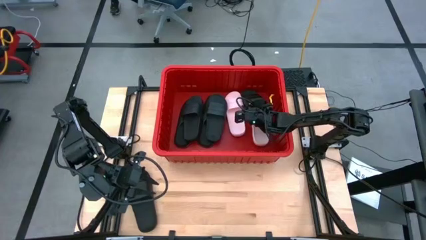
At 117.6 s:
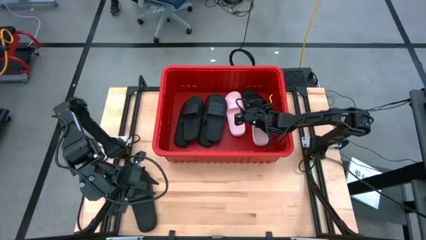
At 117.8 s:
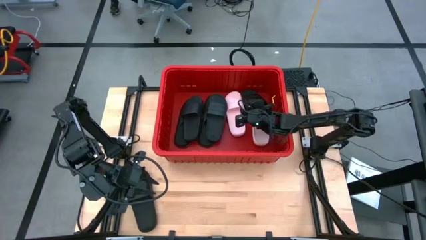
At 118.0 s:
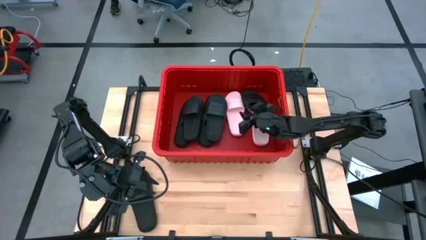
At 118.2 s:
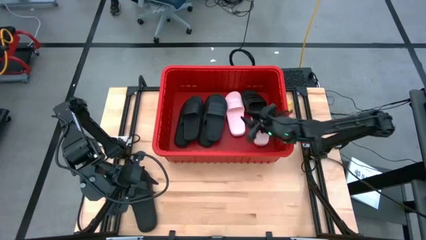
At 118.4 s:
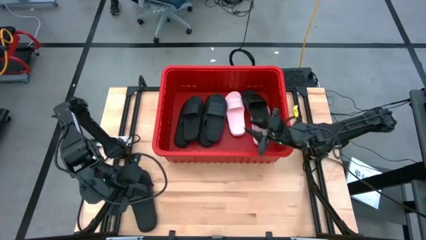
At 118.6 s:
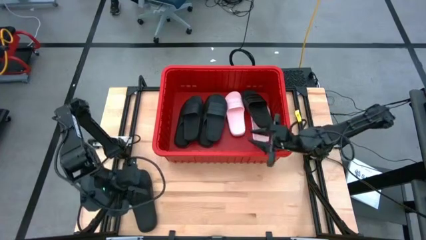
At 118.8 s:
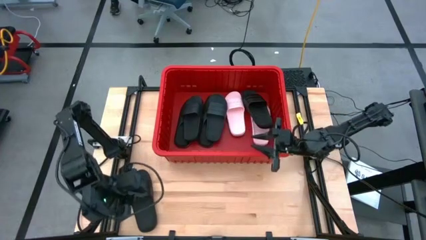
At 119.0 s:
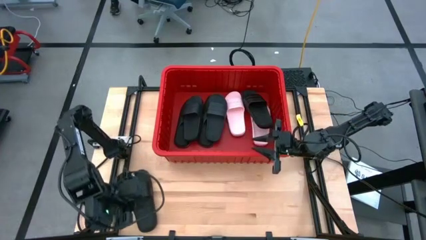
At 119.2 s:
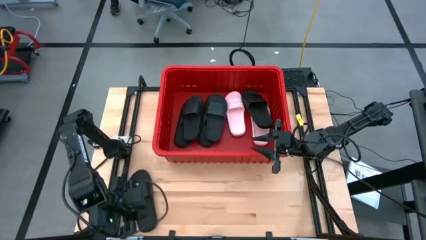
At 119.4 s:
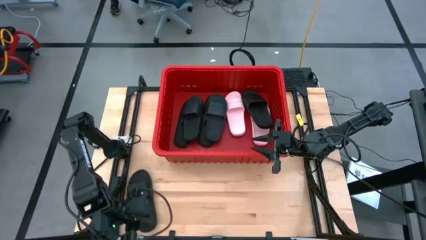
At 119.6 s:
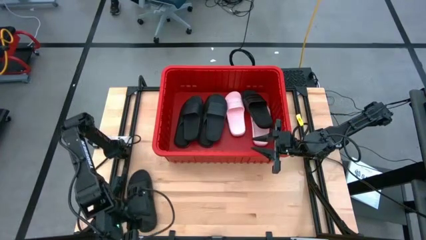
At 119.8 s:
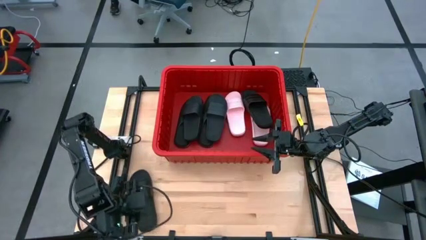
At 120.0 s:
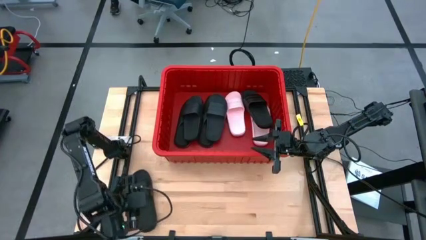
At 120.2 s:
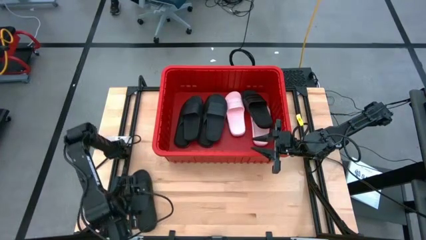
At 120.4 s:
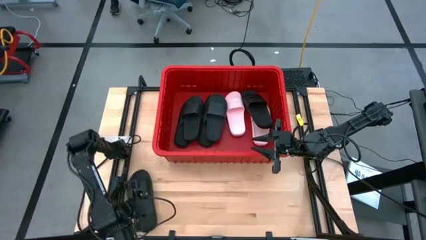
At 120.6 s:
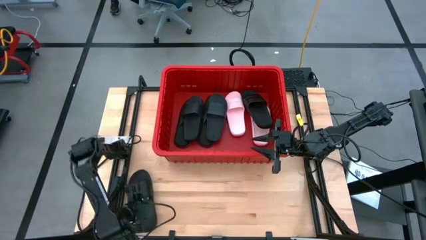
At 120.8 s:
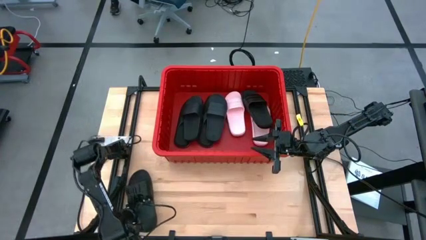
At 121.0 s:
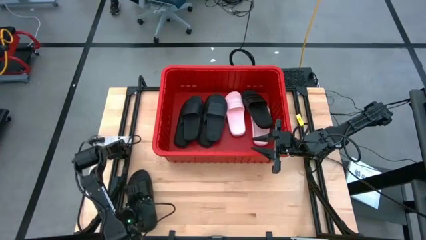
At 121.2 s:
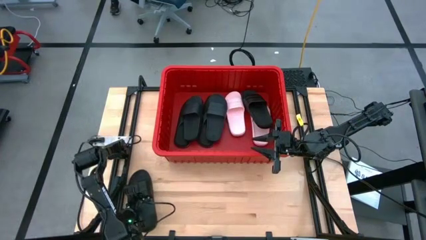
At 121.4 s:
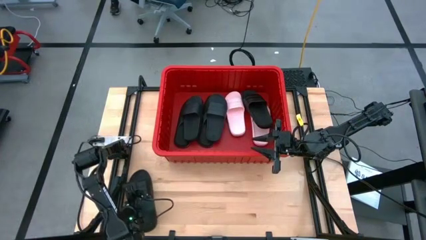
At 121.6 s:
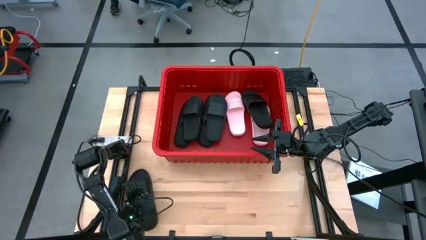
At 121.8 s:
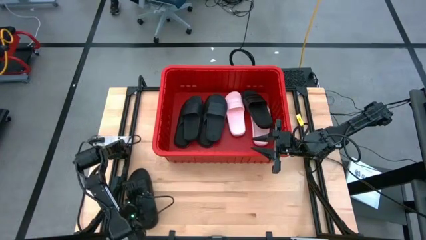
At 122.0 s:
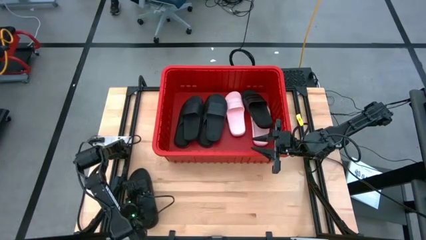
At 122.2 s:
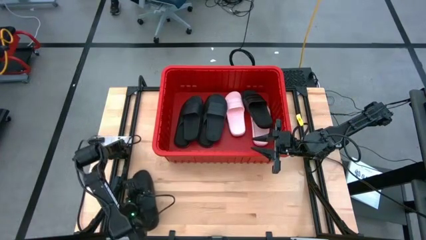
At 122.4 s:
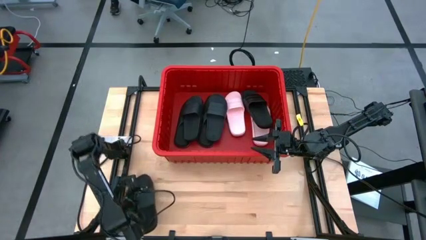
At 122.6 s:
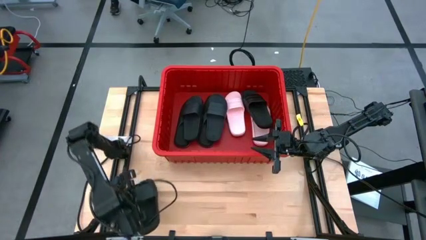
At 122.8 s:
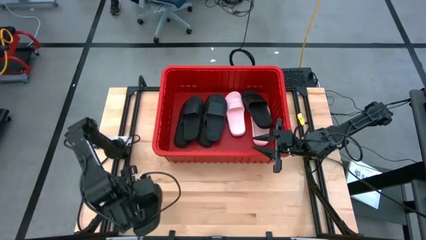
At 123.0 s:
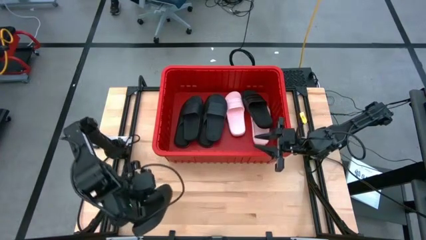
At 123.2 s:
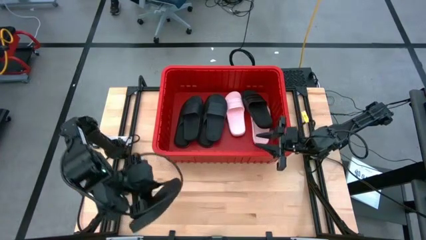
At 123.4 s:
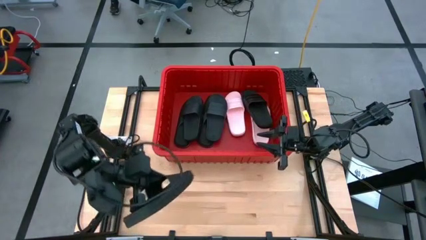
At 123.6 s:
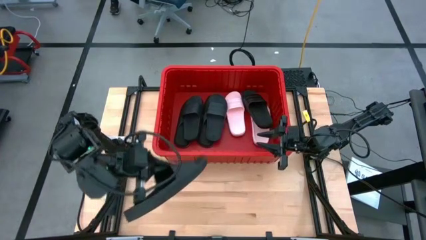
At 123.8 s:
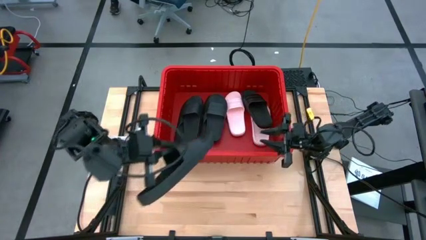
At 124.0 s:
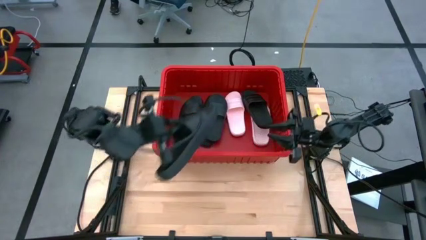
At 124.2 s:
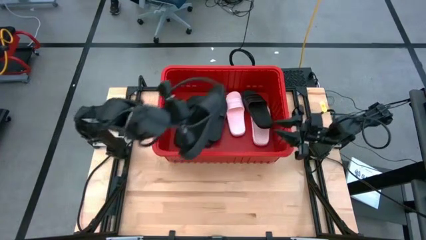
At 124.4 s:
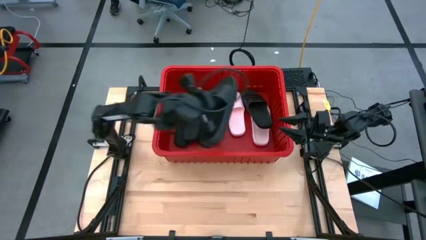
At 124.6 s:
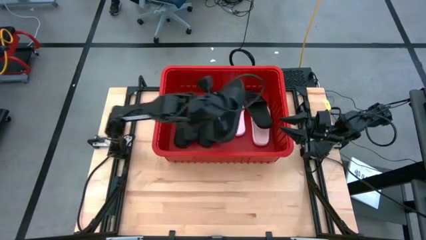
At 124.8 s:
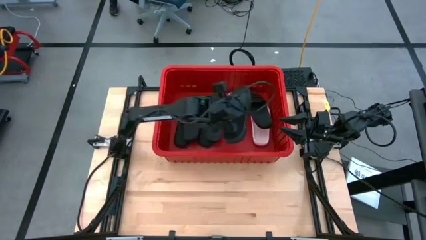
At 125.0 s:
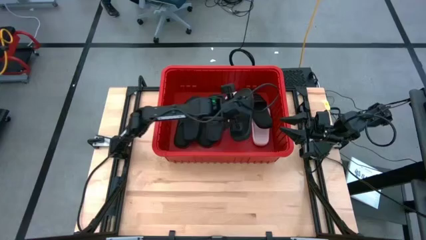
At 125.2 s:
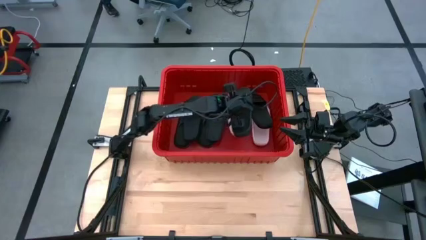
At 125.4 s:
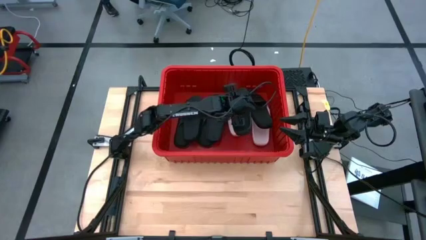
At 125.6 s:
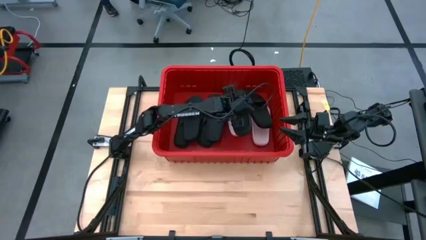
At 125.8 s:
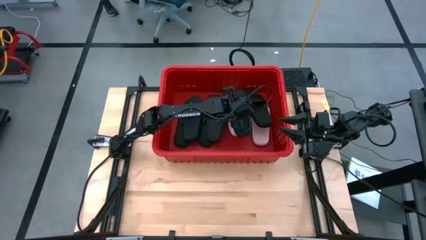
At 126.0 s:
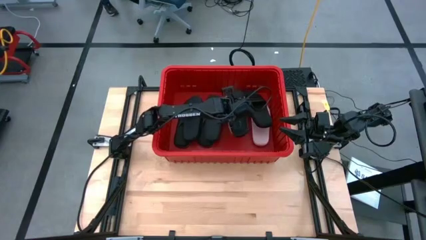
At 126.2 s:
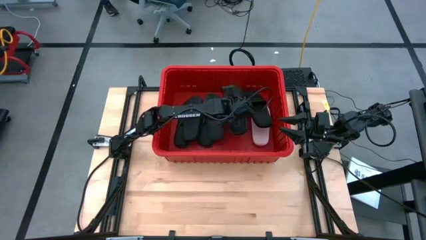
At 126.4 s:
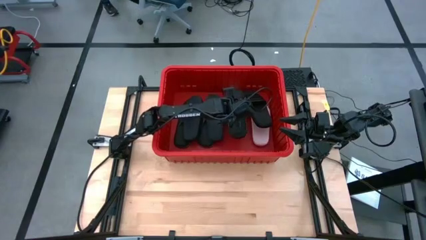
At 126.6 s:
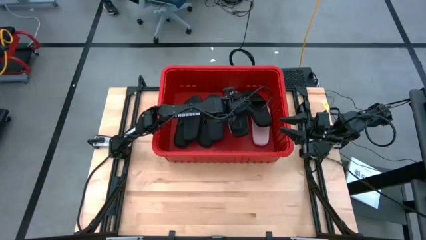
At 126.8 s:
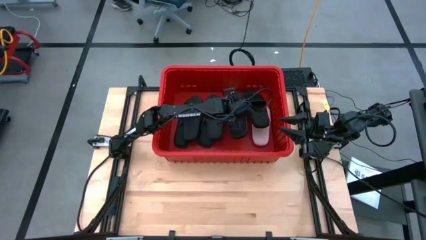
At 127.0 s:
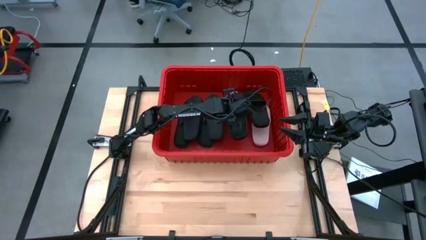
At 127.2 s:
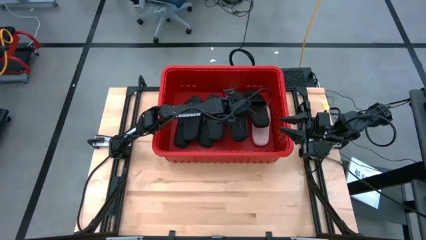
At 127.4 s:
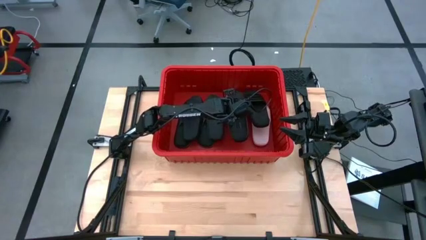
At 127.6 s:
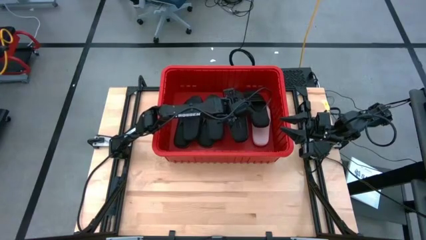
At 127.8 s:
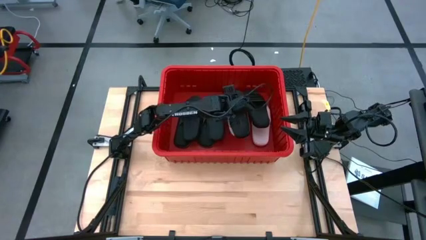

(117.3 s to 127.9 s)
Task: Pick and place slides into bin
Put the black slide into the red bin
